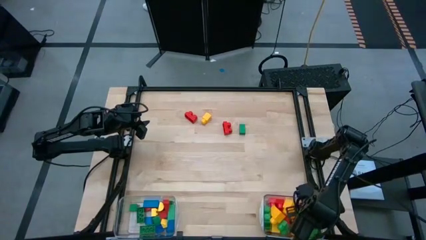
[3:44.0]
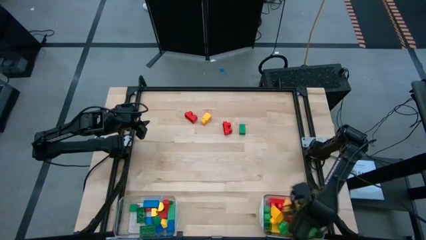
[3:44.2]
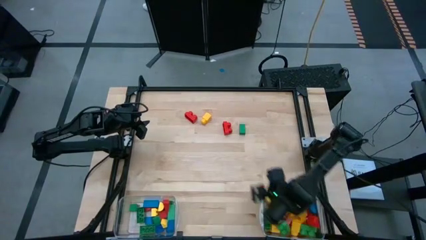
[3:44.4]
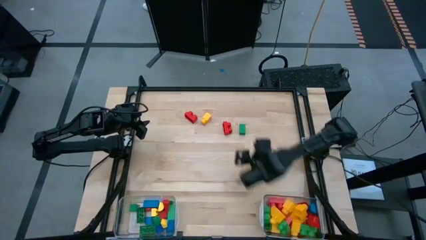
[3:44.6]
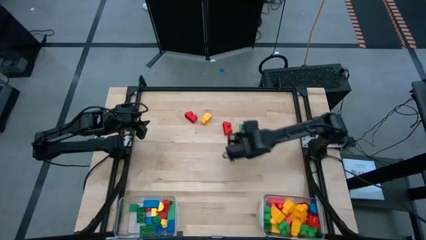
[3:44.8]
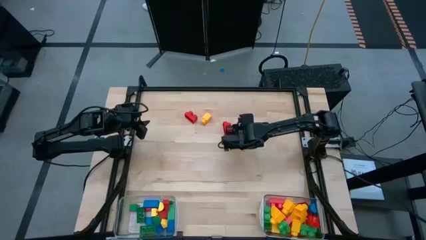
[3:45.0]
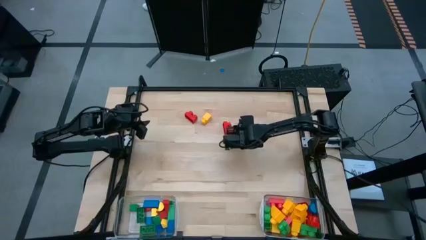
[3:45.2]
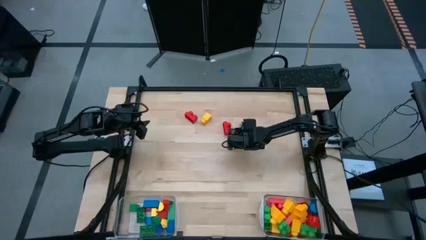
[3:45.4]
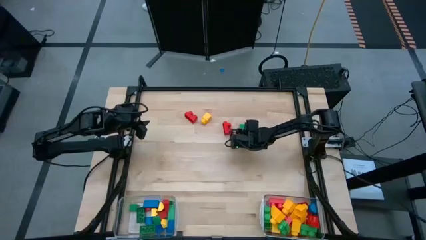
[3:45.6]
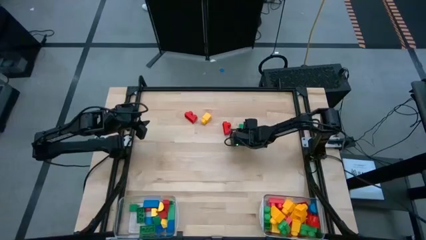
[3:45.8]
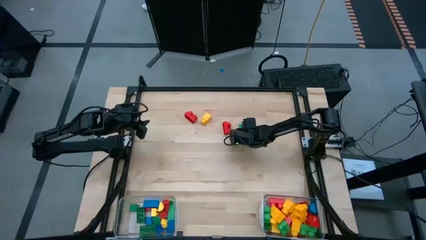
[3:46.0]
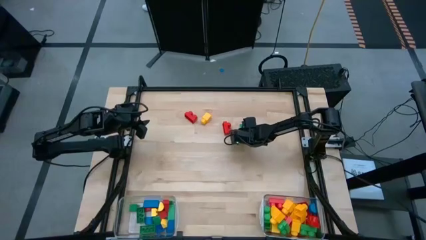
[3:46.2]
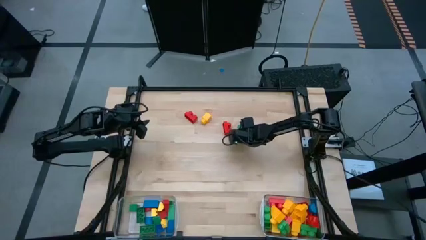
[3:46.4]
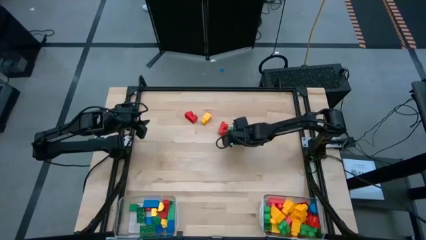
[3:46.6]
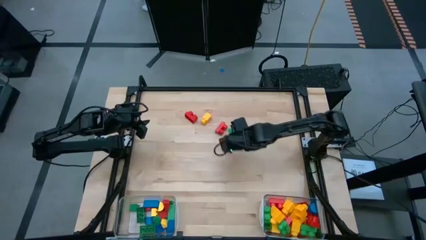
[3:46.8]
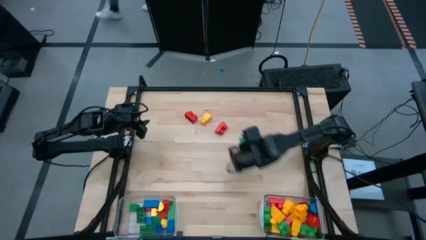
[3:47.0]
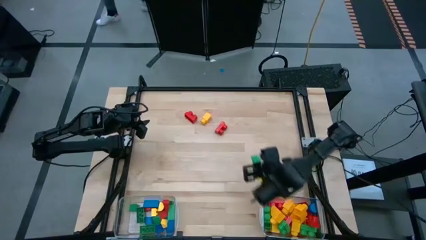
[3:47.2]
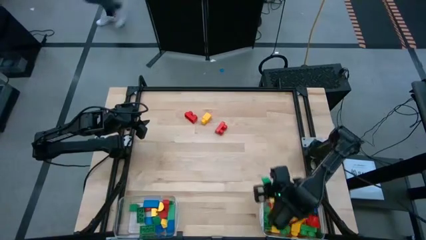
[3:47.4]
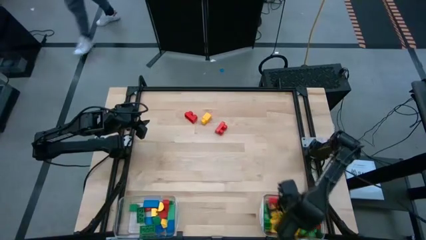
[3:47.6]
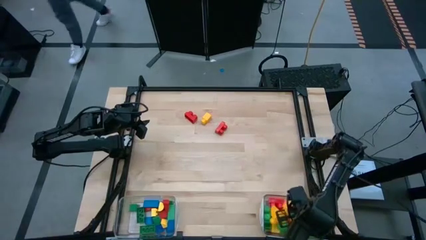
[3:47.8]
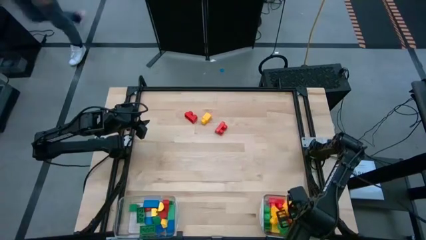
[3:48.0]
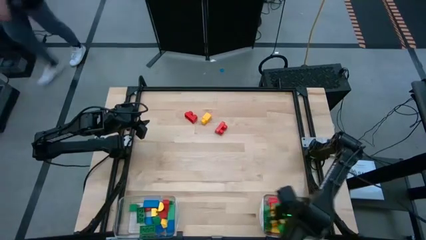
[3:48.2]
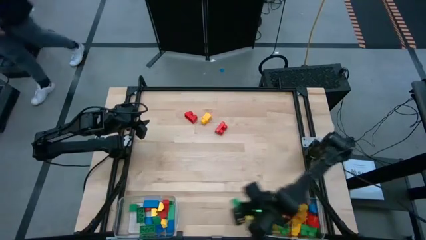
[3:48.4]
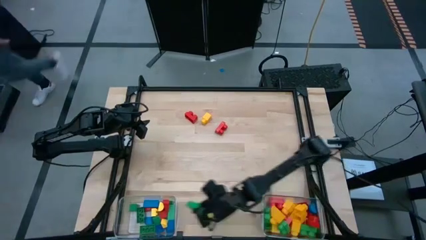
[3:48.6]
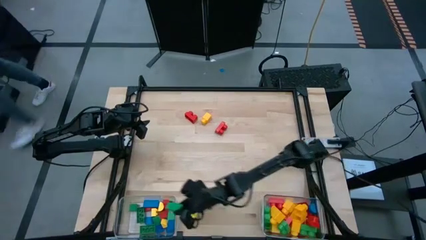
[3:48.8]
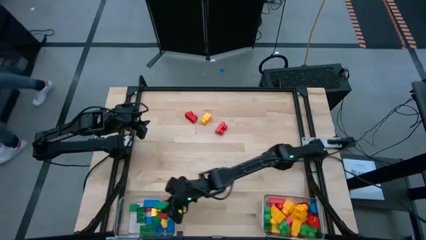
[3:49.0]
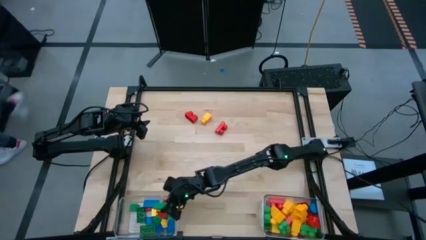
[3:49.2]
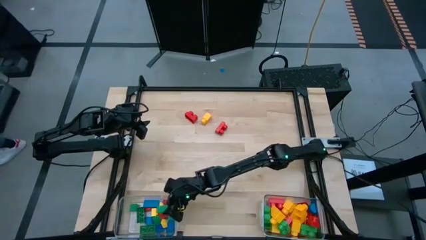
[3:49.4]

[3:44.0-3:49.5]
Task: Sort blocks by size
Put the green triangular block into the left transparent bin

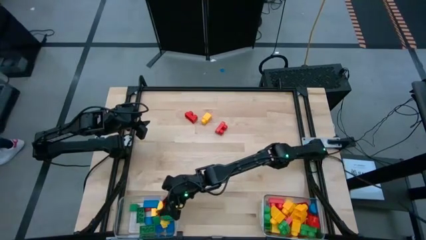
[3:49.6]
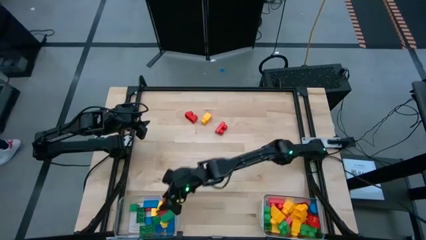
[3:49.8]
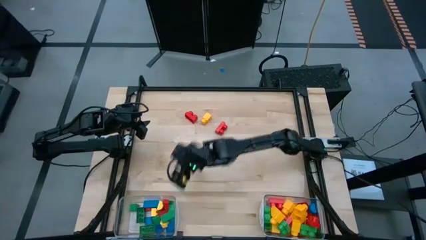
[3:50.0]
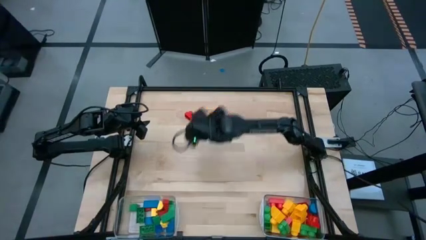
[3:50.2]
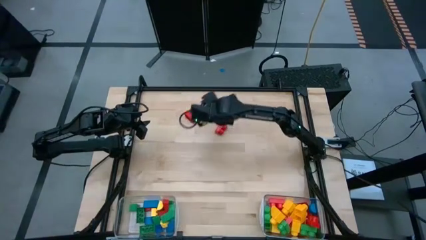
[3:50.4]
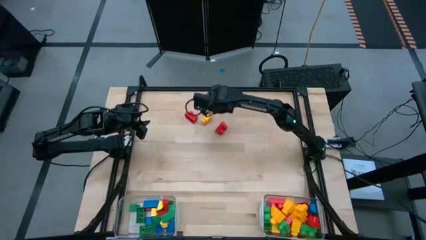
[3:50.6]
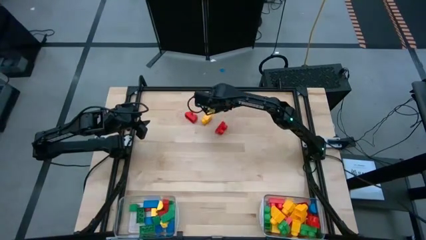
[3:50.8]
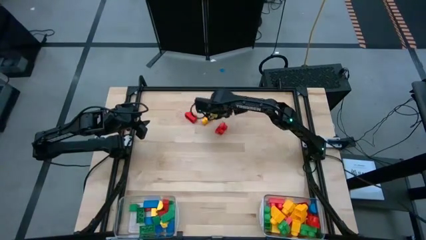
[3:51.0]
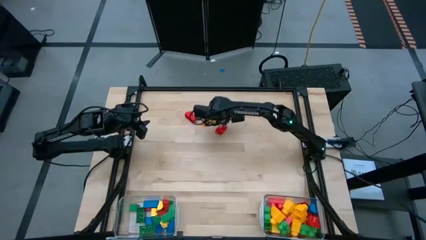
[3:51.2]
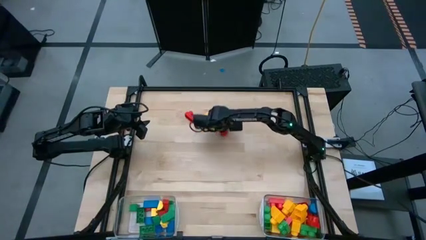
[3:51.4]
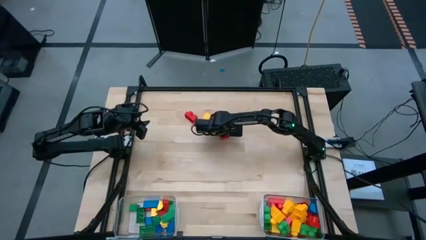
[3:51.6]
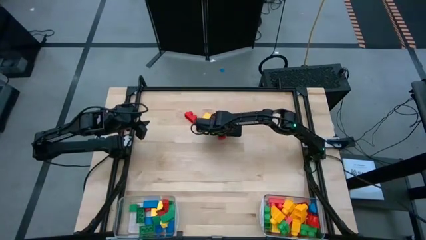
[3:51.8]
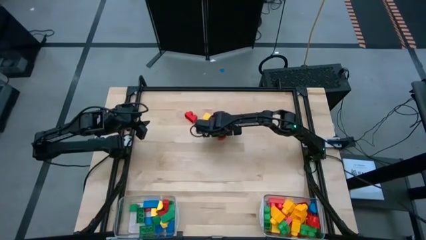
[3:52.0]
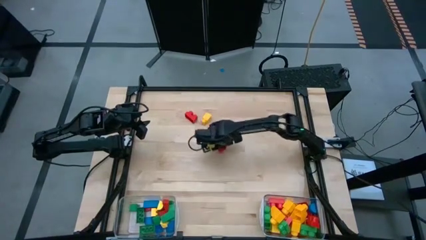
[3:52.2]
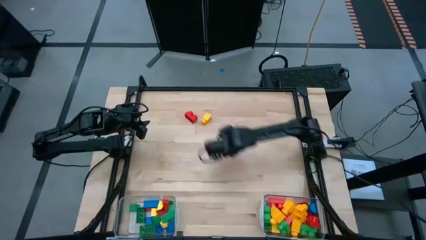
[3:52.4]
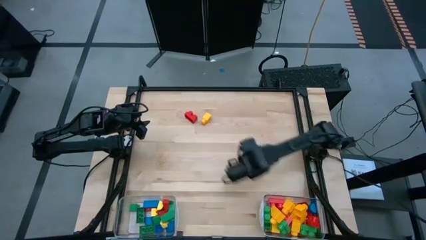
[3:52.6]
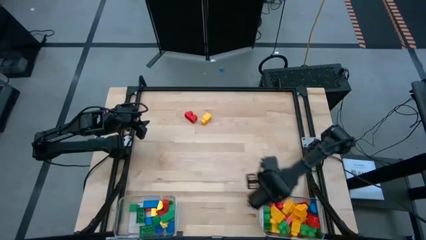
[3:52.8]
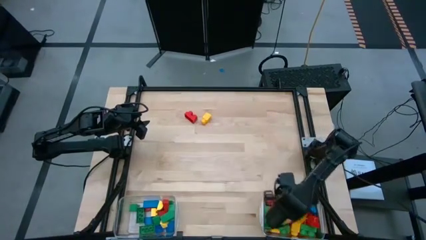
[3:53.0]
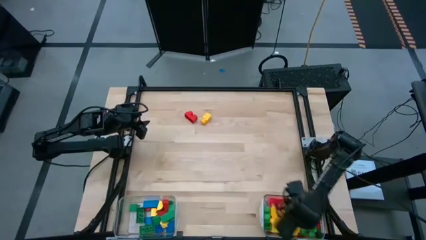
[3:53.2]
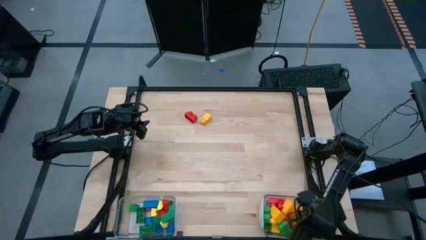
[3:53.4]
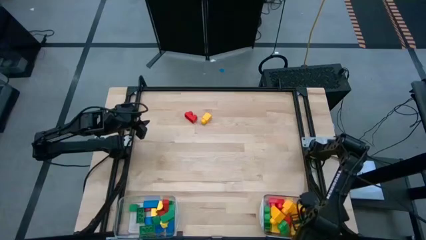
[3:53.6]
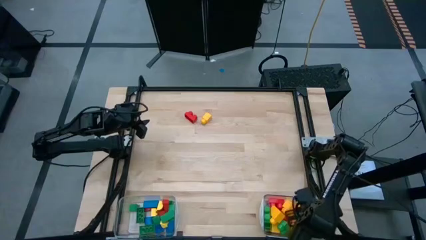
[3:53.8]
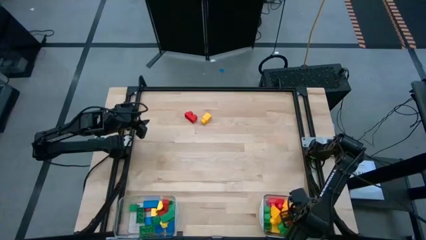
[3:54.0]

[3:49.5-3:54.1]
Put the red game piece into the right transparent bin

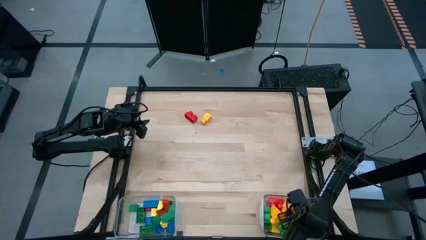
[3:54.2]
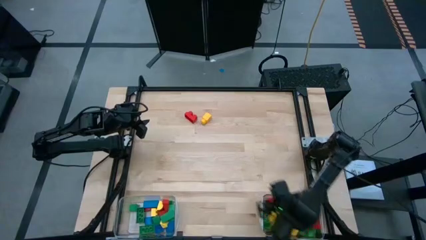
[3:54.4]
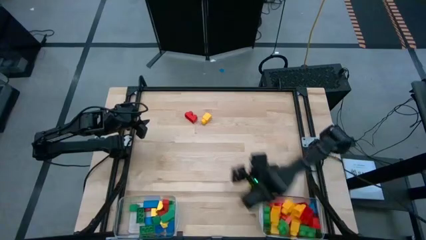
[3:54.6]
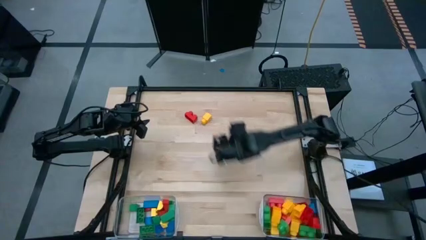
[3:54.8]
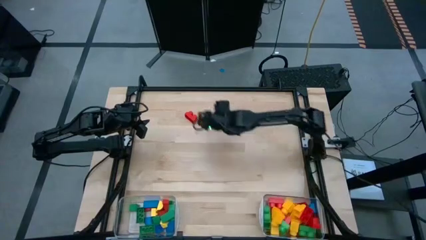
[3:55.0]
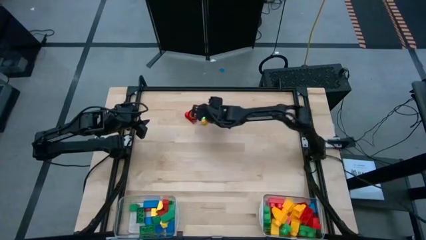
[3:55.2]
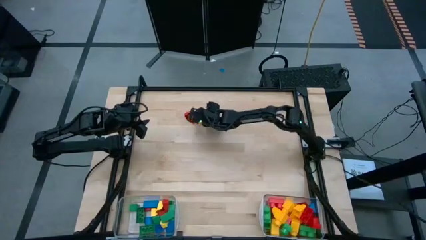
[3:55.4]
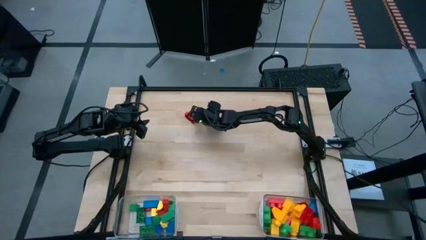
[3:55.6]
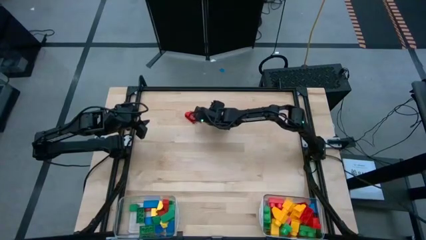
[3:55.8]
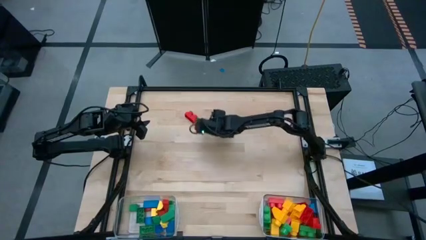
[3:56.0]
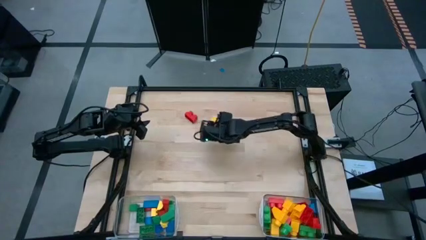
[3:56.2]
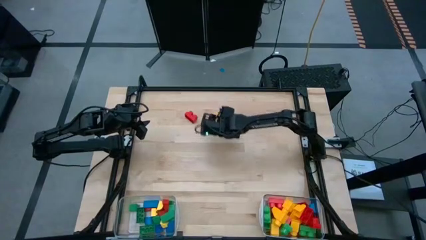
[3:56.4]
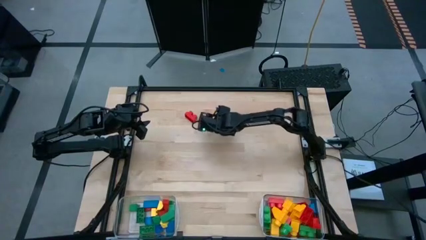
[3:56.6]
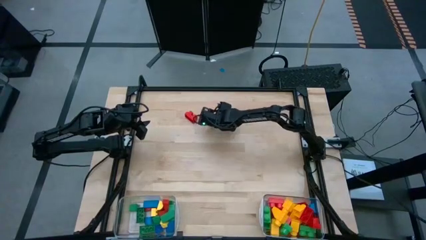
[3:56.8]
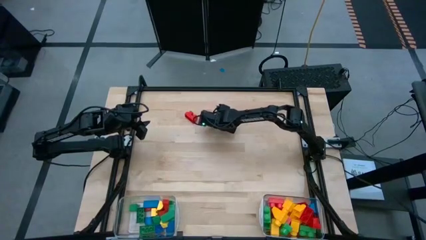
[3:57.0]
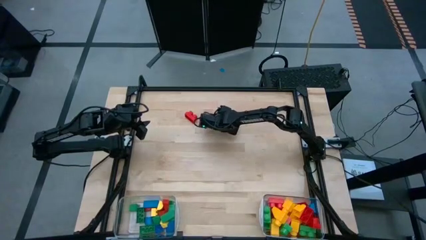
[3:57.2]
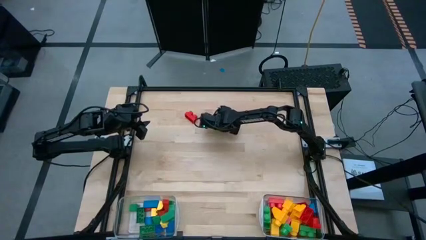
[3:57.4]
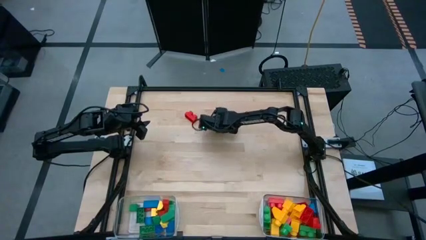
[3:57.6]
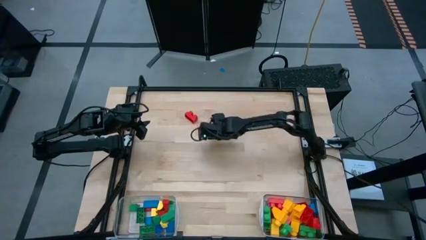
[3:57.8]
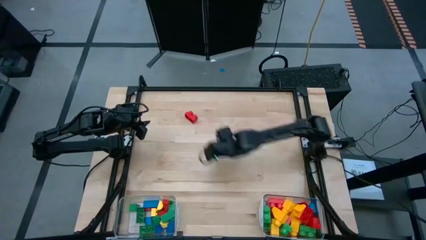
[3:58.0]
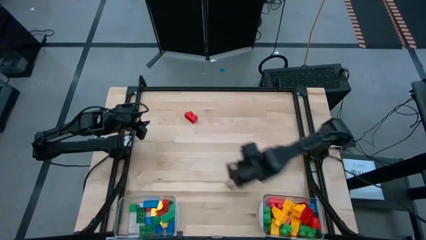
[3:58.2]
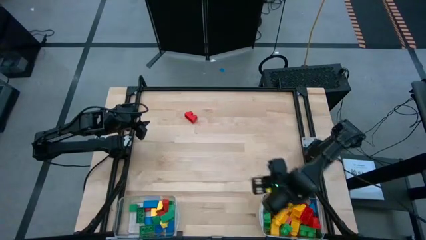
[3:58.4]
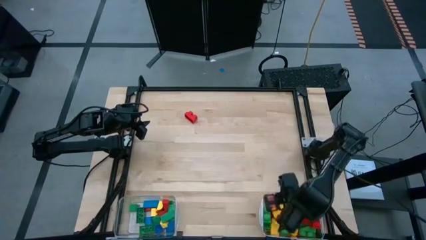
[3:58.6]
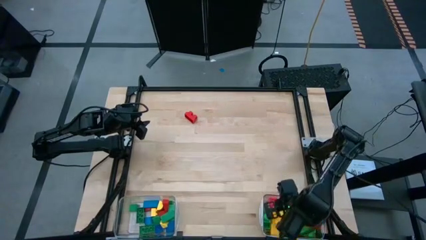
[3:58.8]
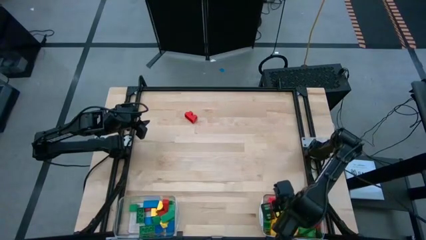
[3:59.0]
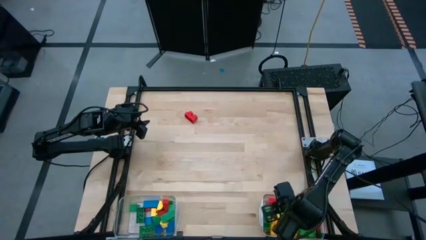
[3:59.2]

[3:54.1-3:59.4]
Put the yellow game piece into the right transparent bin

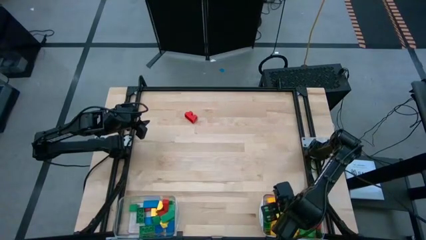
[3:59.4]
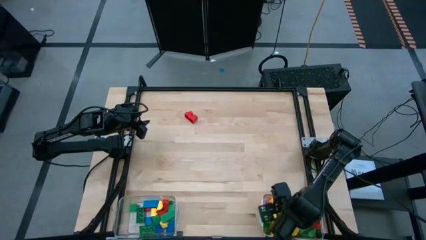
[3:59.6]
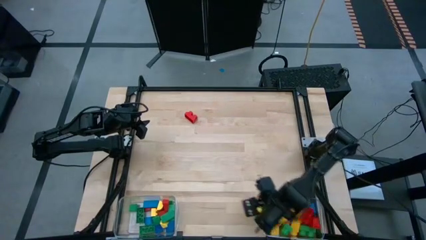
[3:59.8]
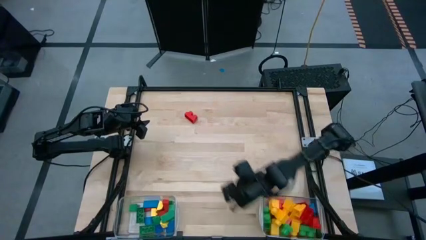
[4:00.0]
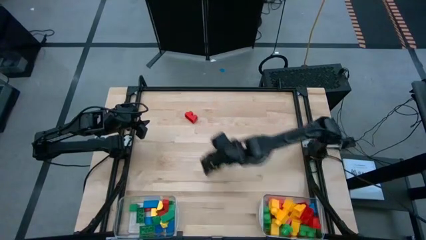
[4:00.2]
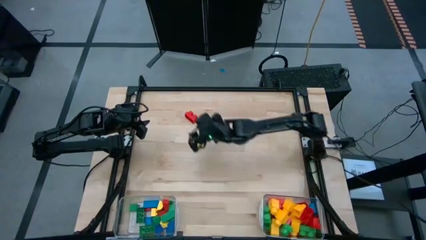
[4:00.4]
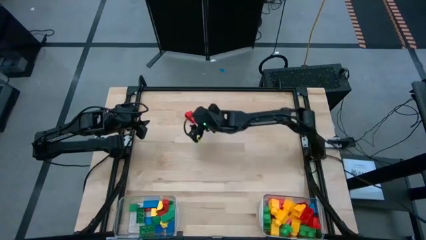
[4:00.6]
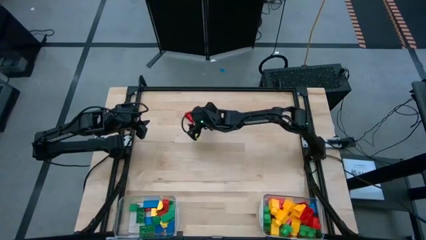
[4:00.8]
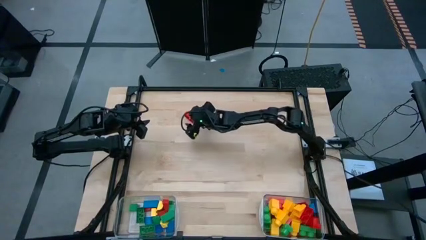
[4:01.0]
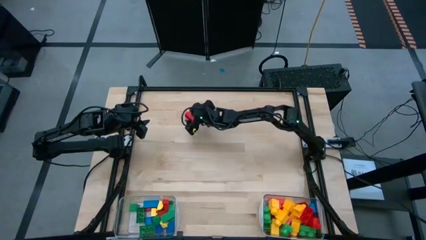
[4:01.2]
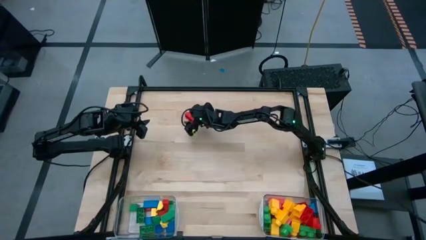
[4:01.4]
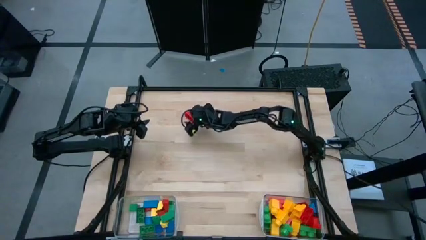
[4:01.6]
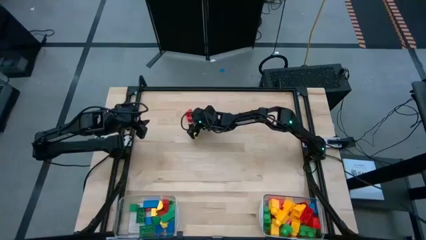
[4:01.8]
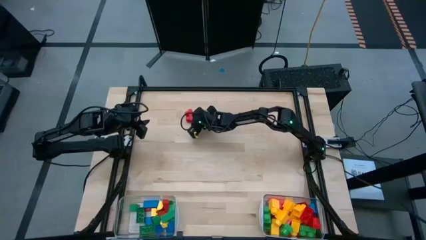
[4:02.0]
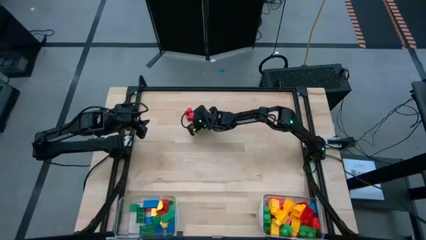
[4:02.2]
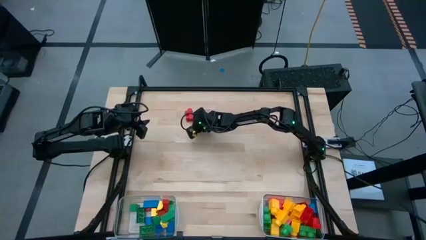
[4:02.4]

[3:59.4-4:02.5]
Put the red game piece into the right transparent bin
